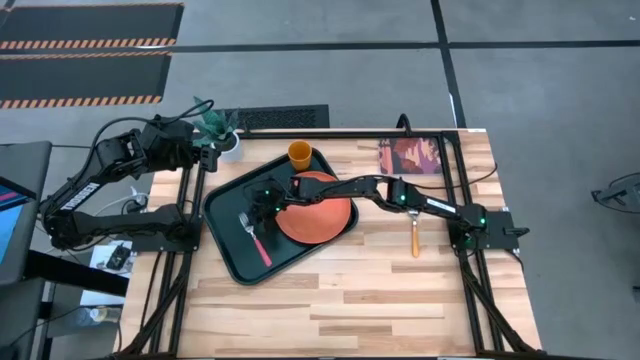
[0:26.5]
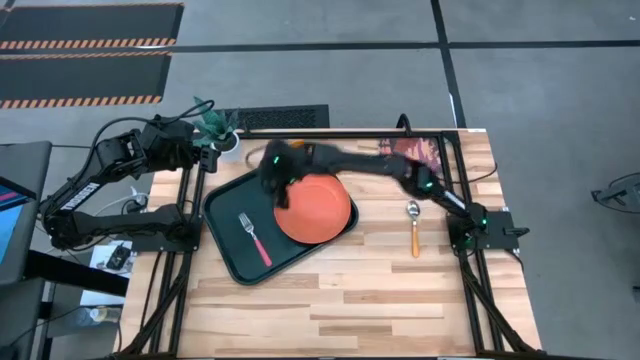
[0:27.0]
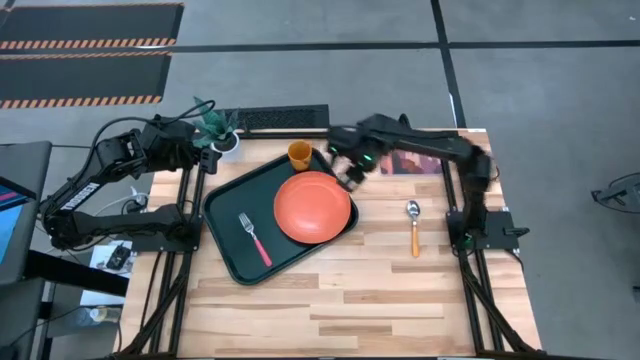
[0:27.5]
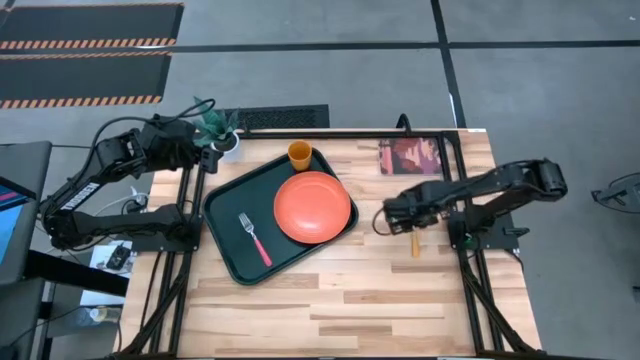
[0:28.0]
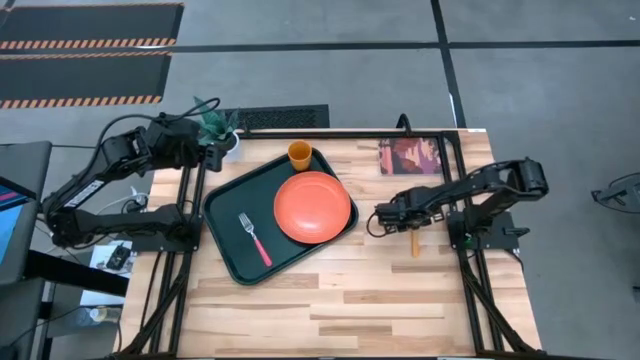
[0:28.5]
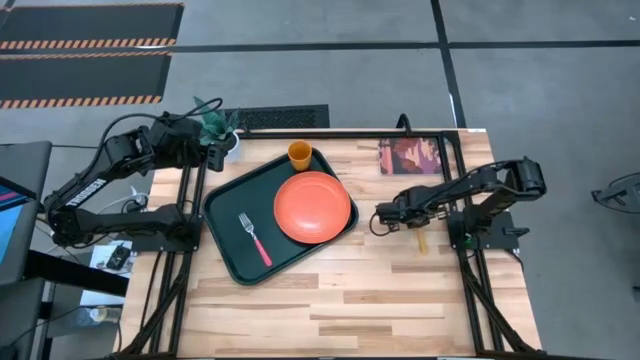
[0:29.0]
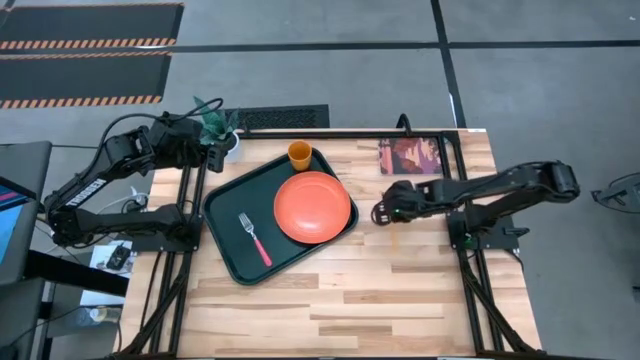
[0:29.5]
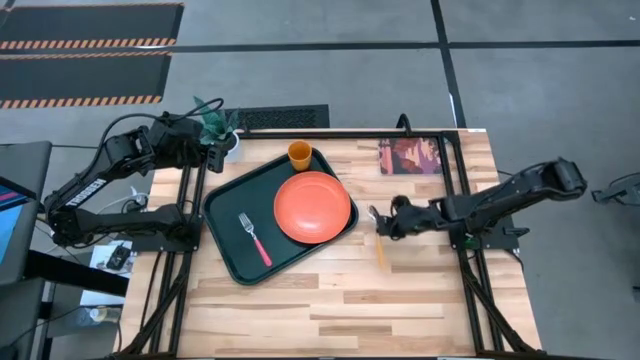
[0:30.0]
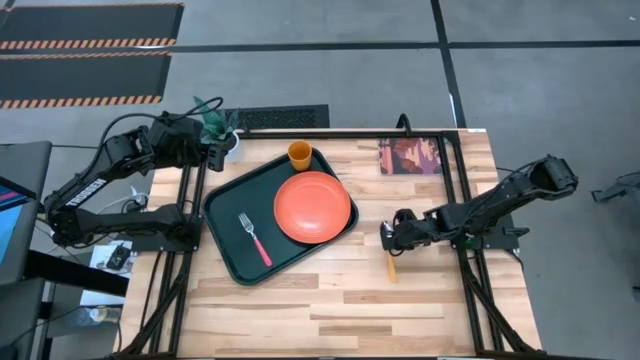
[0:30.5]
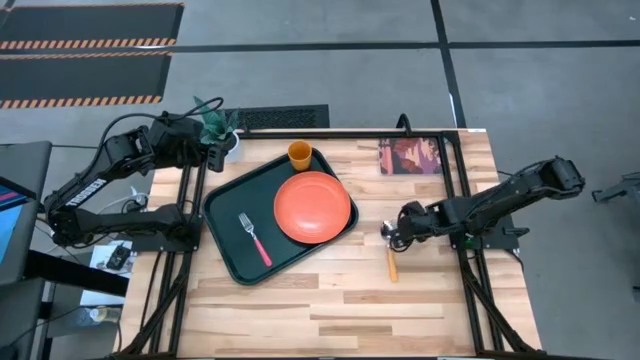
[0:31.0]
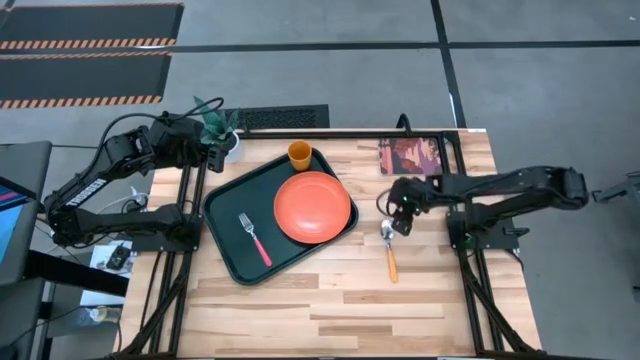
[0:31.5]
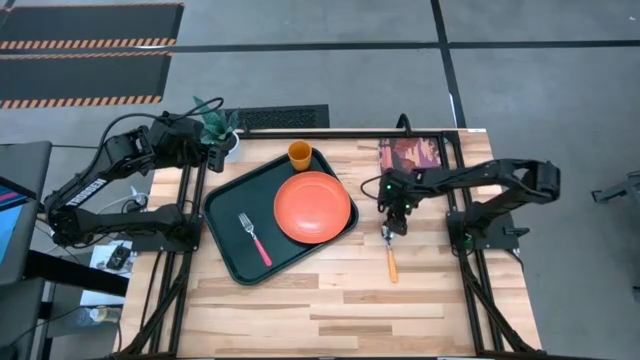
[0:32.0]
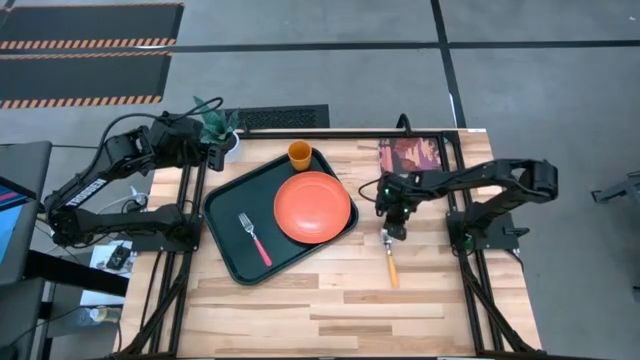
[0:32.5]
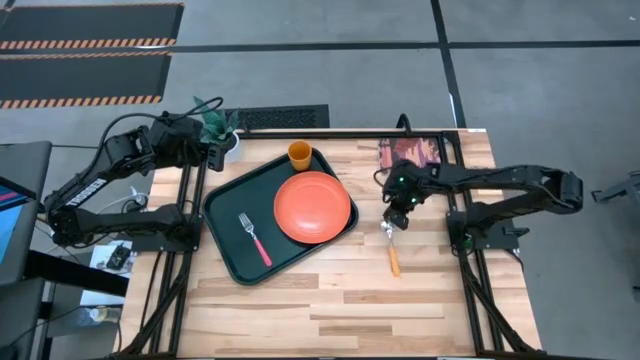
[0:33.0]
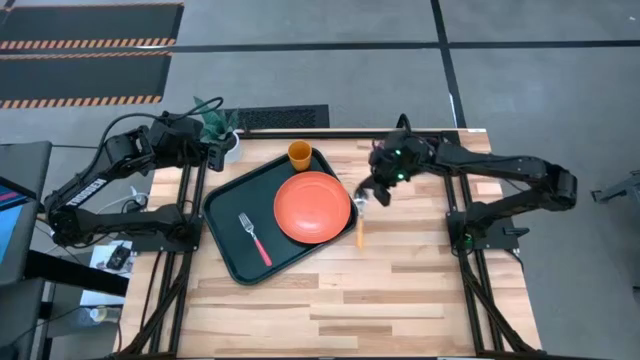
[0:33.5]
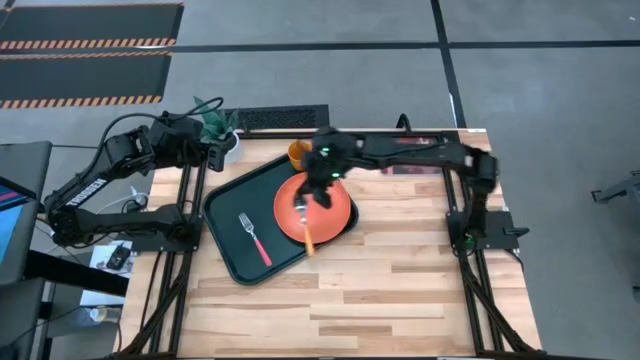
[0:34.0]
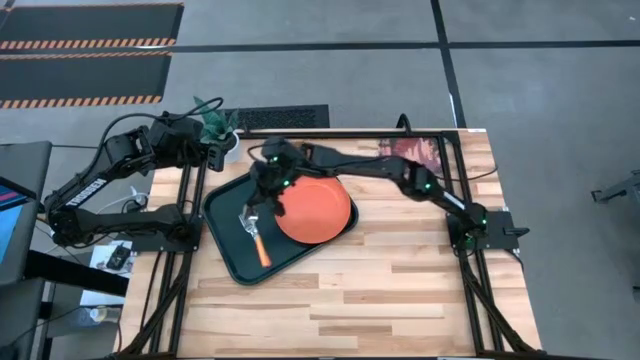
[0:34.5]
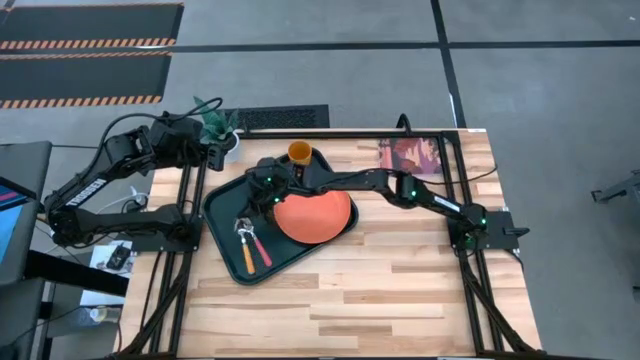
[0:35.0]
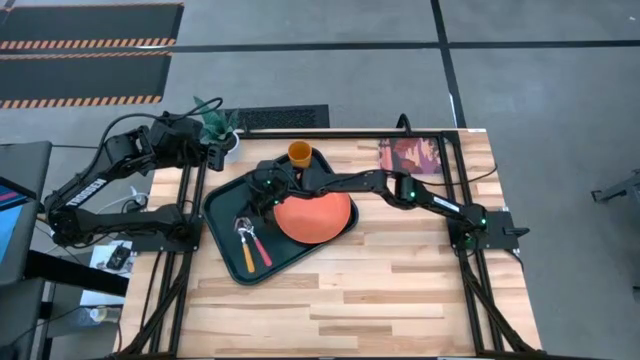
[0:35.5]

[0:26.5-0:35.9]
Task: Pick and place plate/cup/fork/spoon on tray
Put the yellow spoon on the black tray

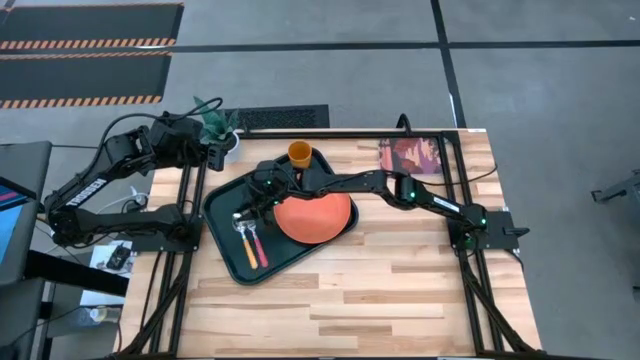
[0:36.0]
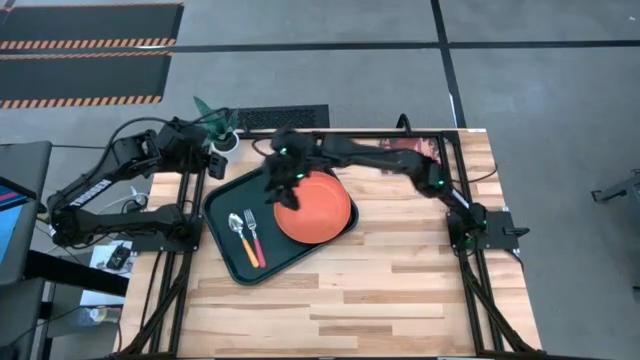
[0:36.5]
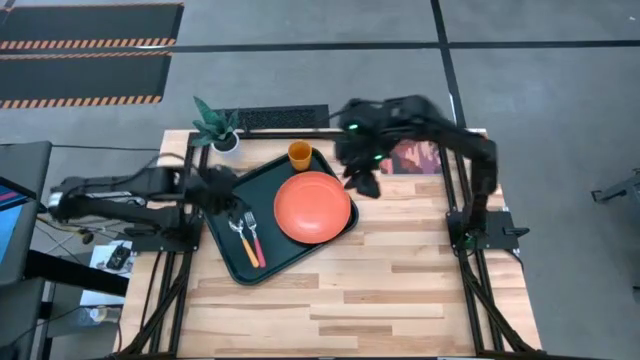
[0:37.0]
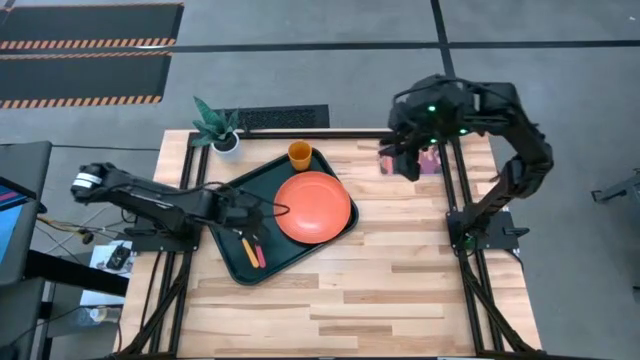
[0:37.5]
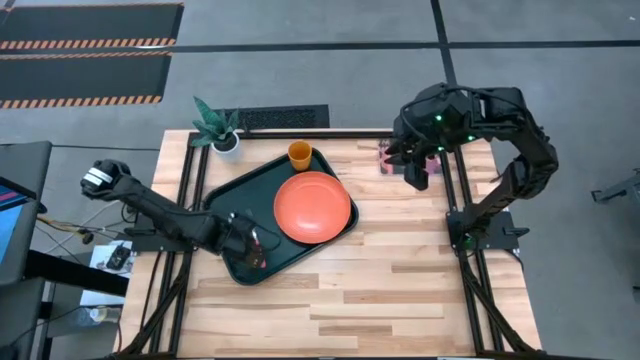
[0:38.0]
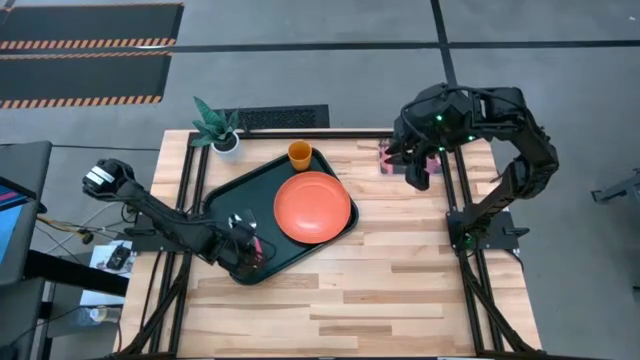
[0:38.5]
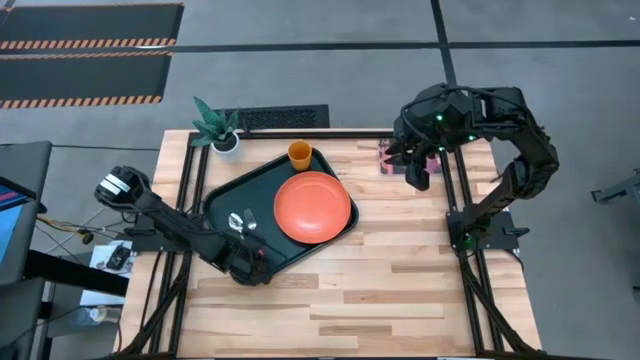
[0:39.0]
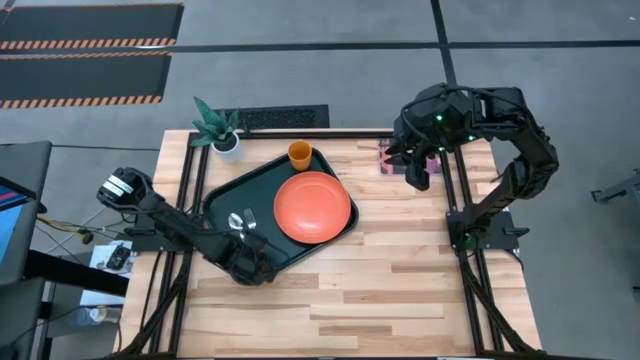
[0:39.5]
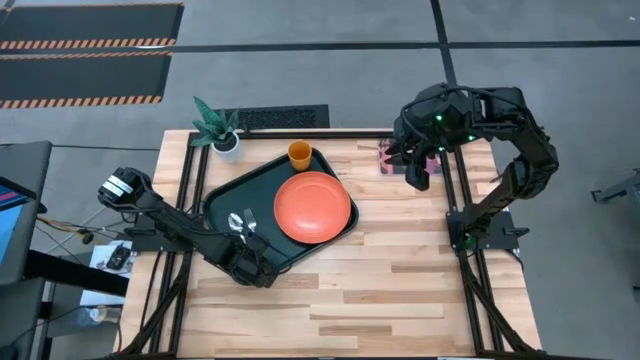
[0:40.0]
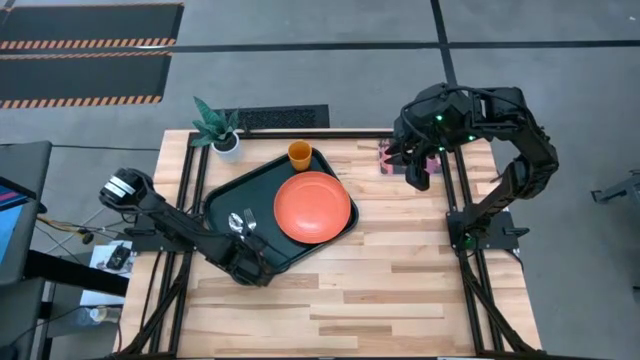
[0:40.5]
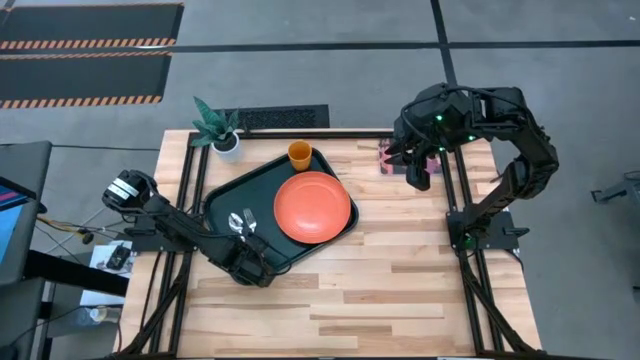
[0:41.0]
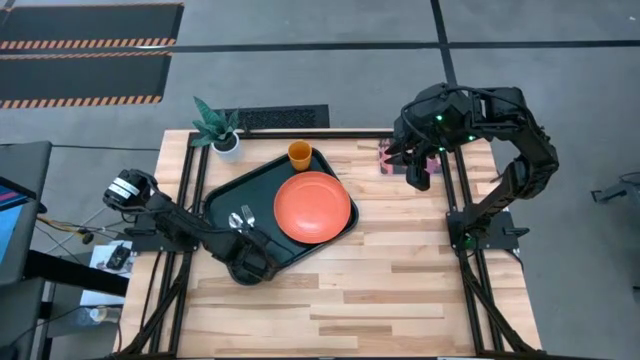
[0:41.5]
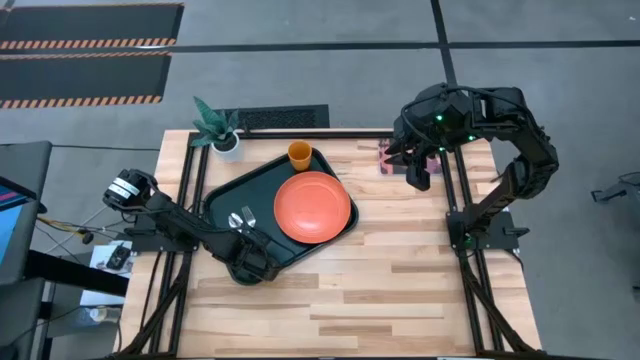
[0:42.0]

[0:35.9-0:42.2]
Adjust the pink fork on the black tray

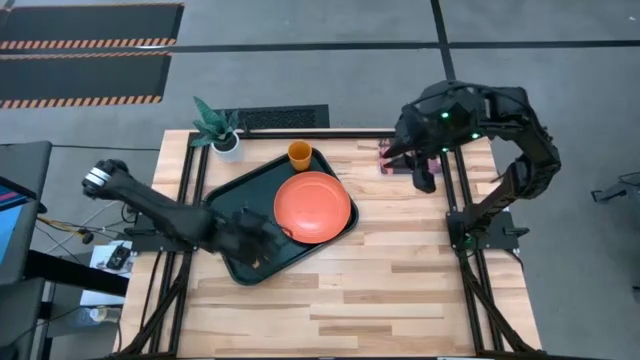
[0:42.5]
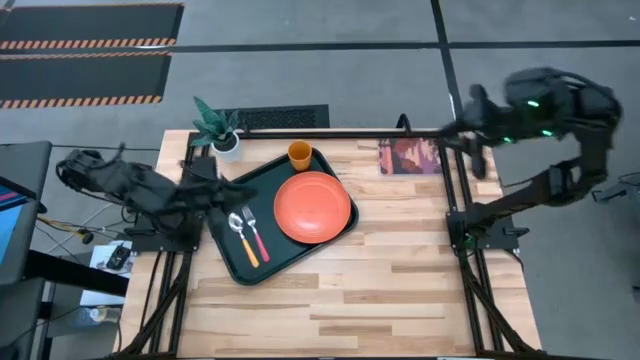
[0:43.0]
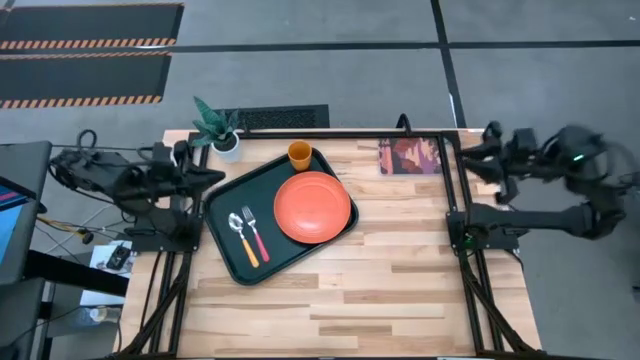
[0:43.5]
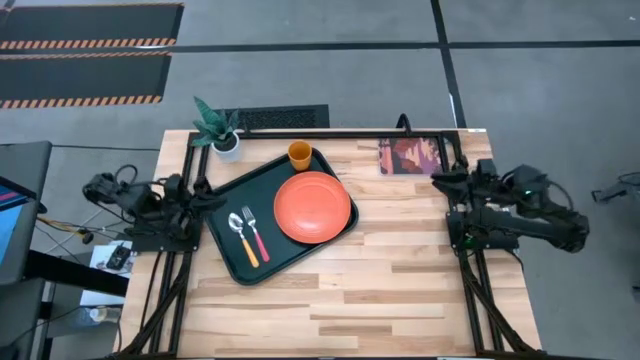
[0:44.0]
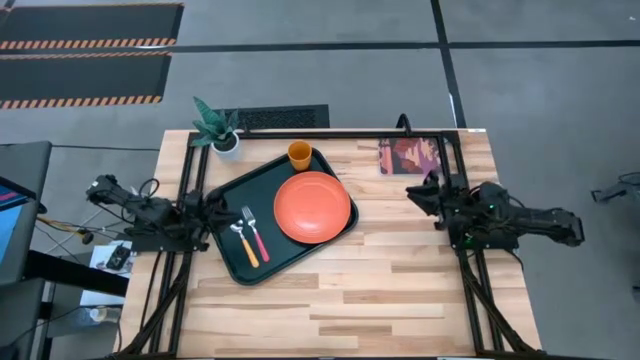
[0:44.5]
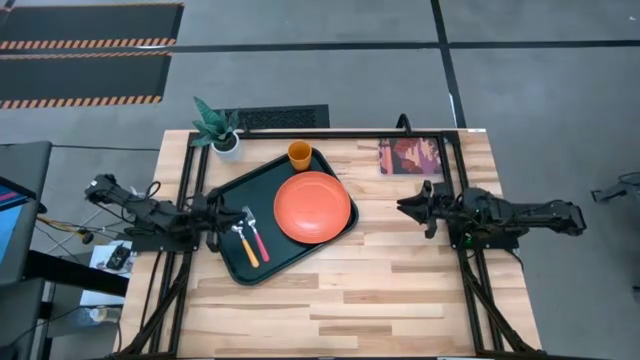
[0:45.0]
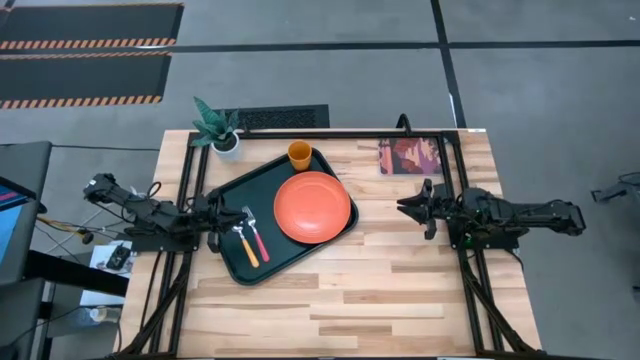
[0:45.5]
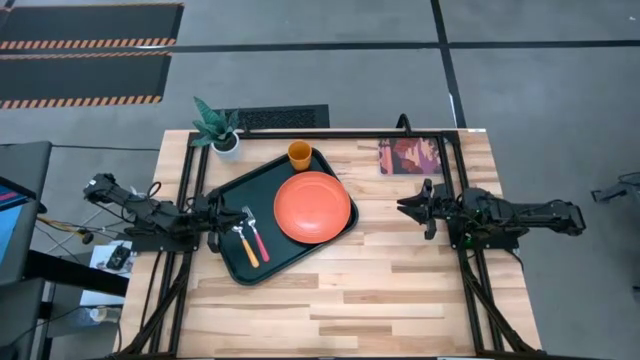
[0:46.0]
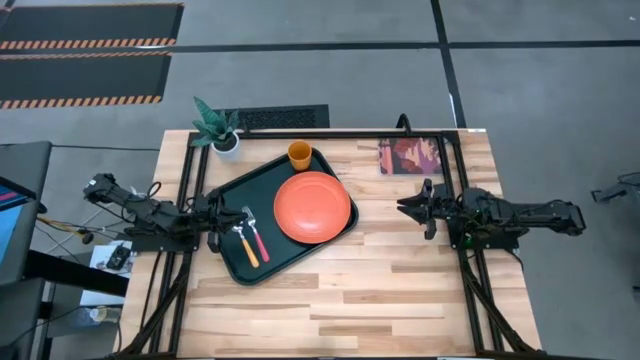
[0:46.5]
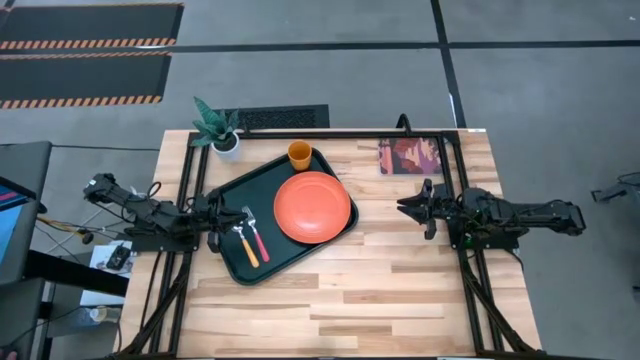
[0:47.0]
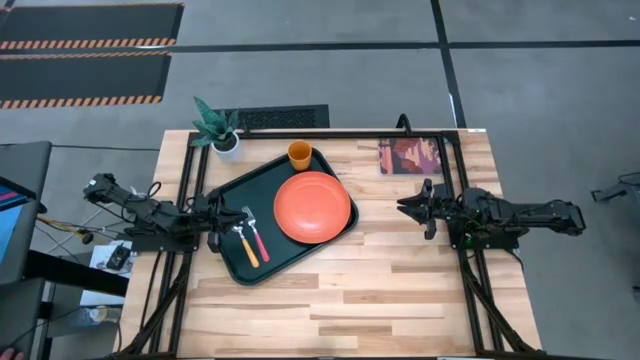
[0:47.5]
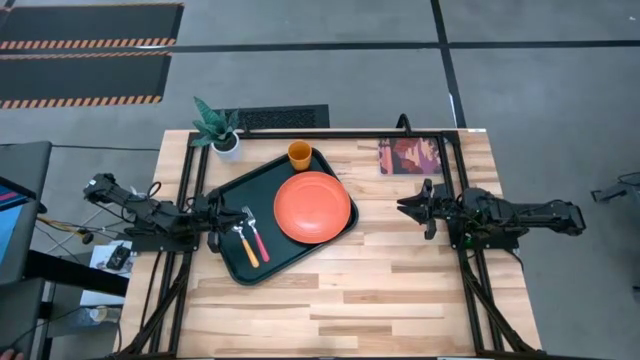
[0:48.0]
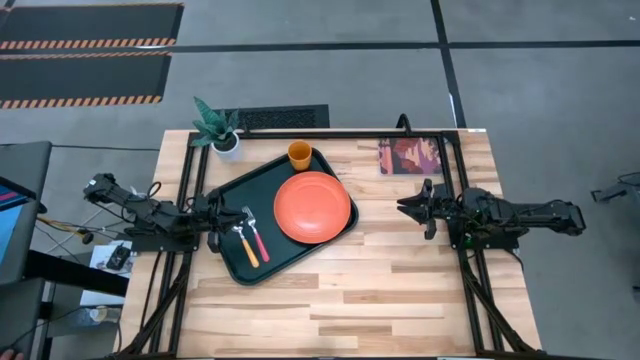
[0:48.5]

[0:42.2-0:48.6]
Return to Home Position
